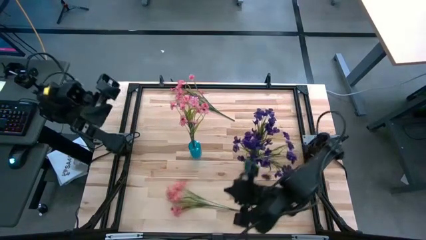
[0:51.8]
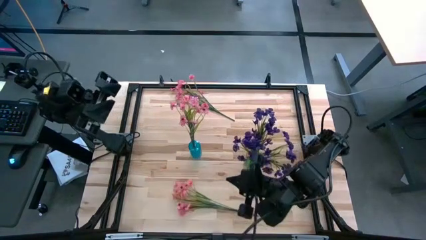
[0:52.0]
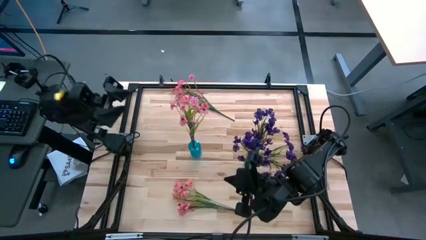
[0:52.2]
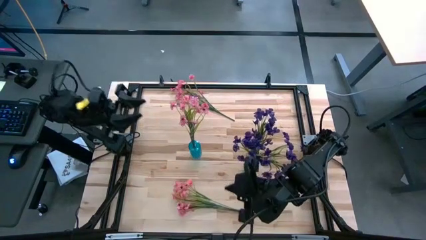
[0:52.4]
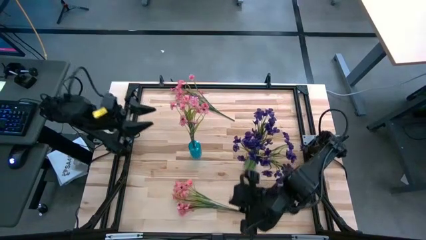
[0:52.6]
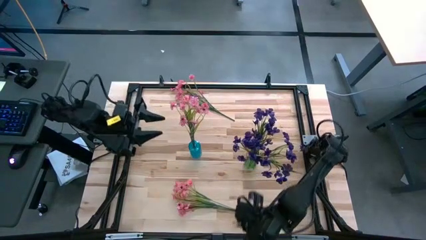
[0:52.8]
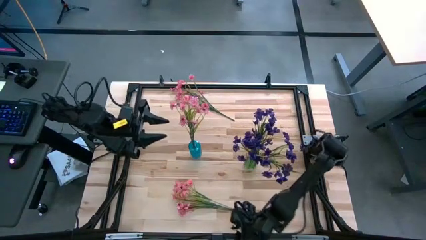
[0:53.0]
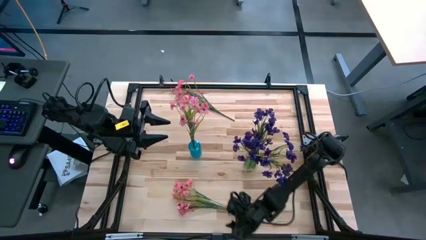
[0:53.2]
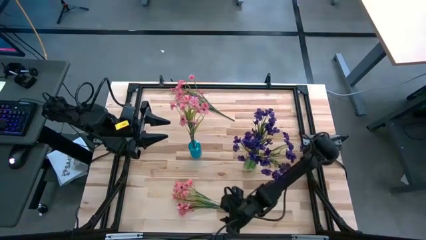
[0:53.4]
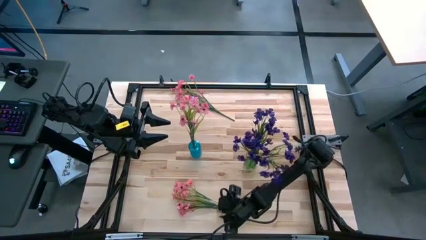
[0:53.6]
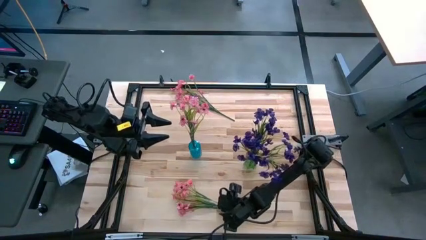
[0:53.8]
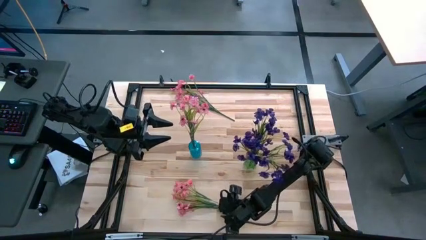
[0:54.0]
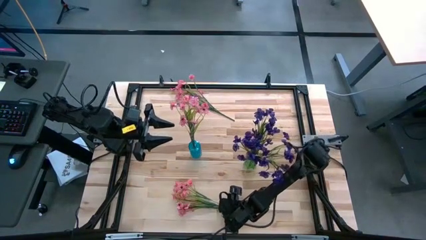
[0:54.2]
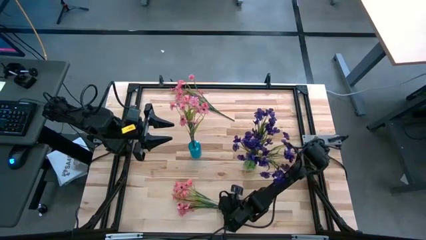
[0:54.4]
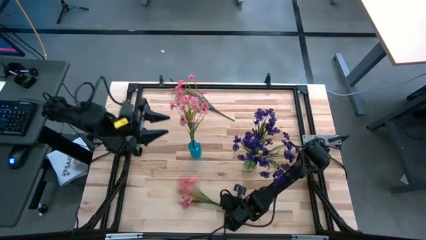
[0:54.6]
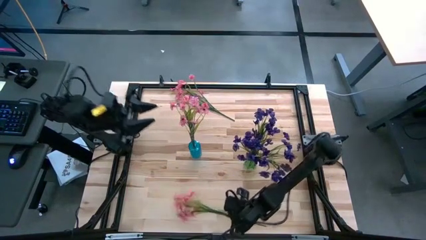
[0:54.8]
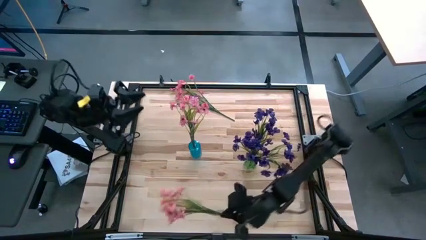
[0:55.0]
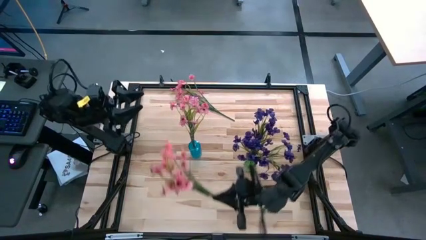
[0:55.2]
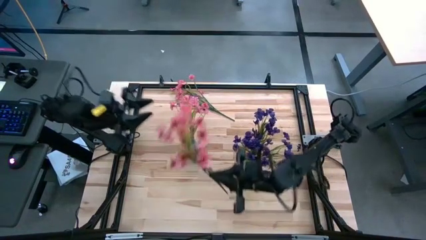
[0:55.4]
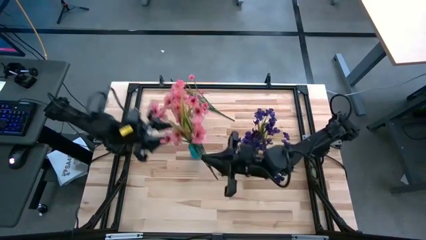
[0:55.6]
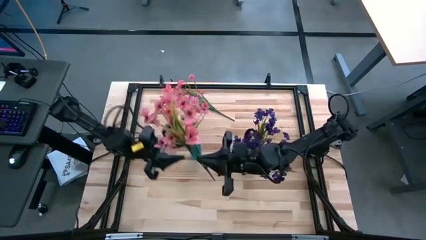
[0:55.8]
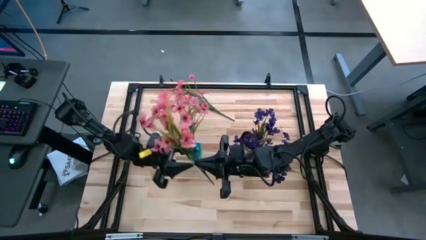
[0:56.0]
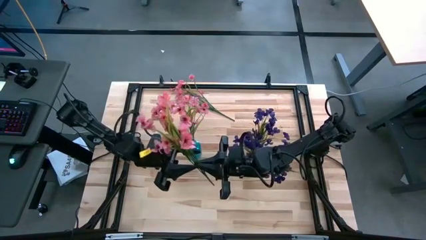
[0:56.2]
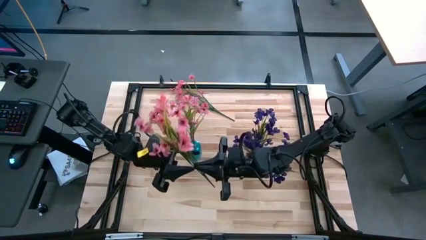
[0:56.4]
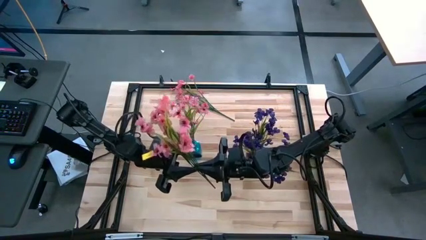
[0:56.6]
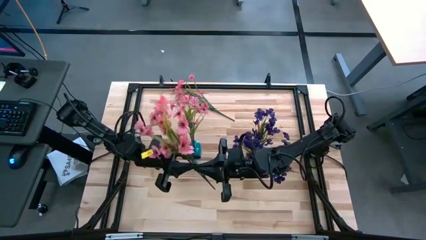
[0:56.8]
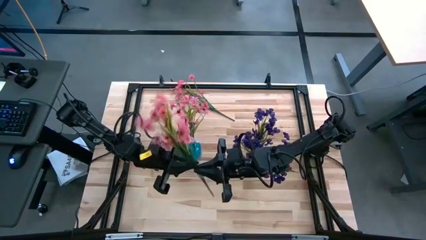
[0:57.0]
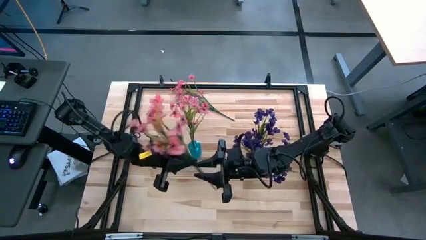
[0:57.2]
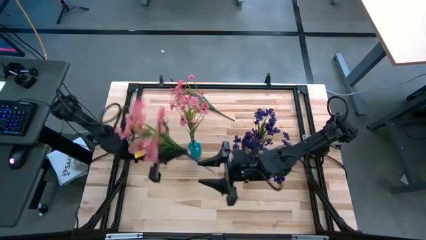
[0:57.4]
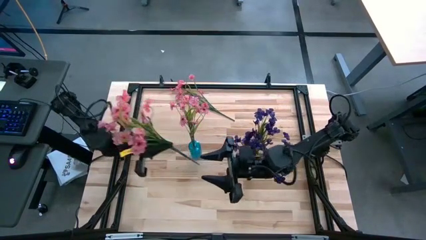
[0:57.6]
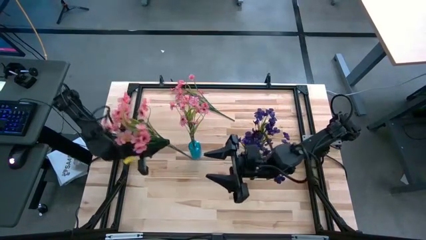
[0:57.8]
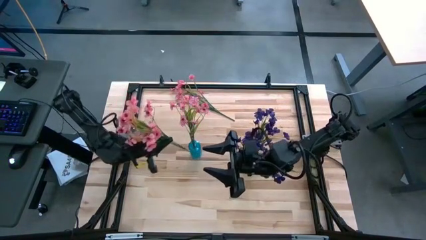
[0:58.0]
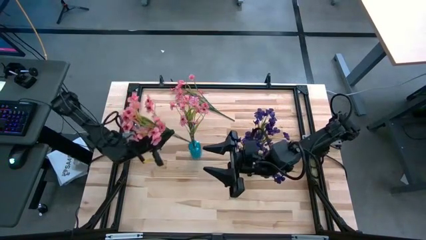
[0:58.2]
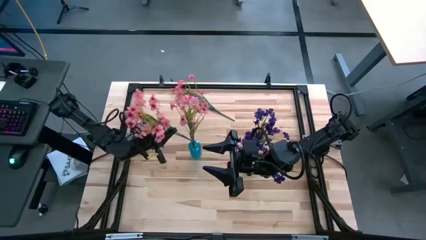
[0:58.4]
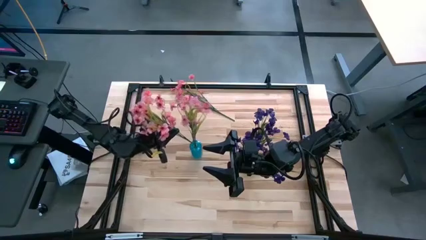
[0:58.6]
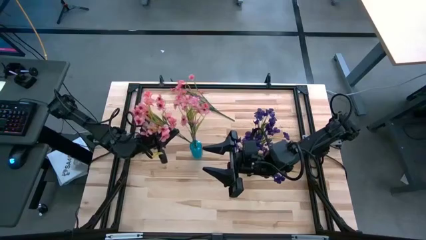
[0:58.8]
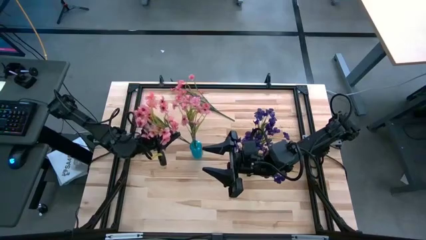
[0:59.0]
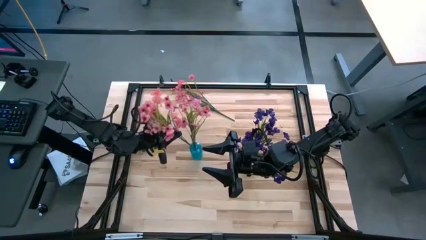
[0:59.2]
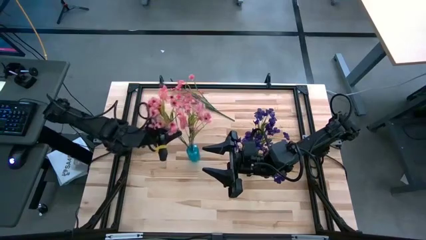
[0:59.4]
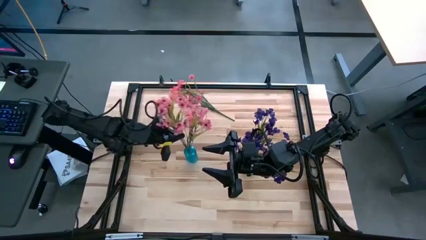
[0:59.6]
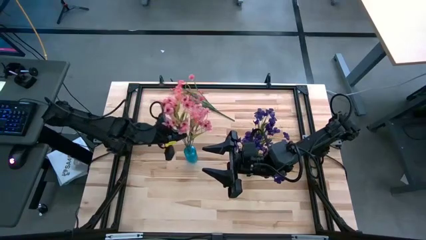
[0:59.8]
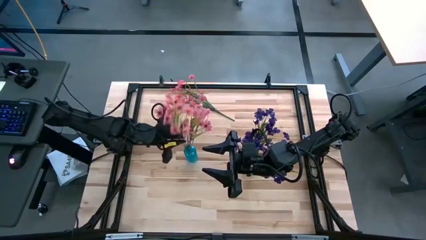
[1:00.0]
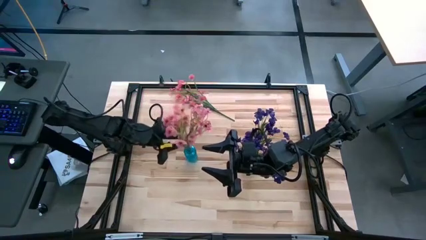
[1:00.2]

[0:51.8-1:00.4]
Task: Sort flowers into vase by color
Put the bottom pink flowers into the blue vase

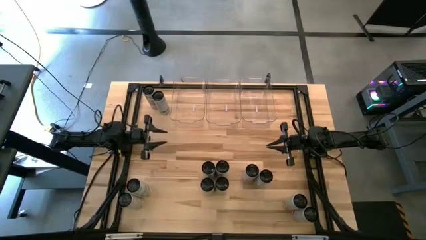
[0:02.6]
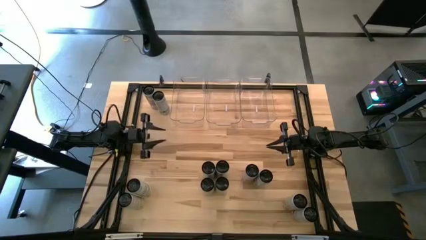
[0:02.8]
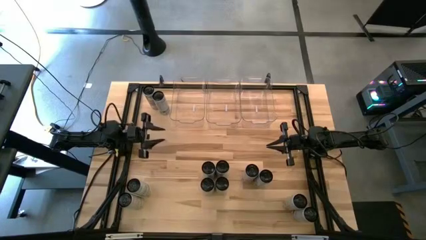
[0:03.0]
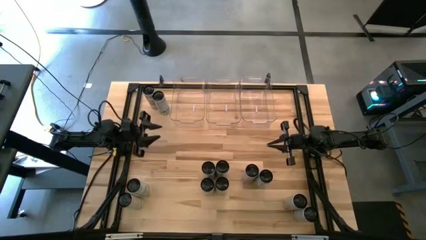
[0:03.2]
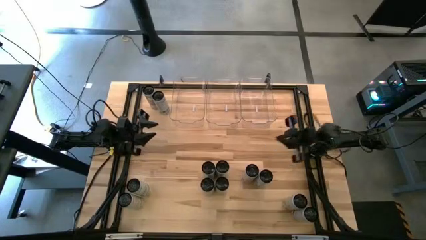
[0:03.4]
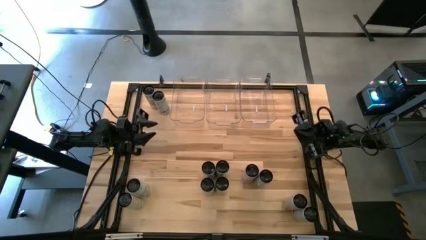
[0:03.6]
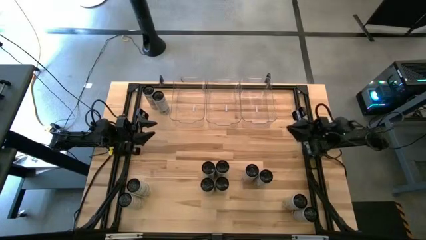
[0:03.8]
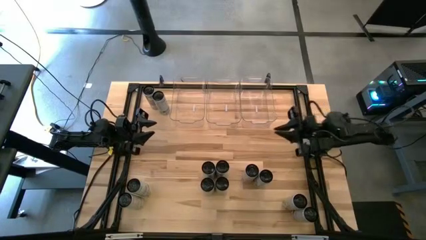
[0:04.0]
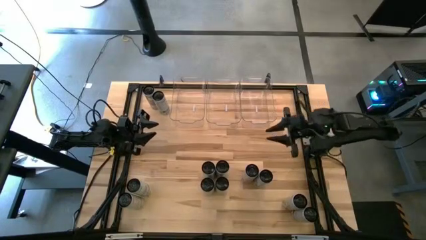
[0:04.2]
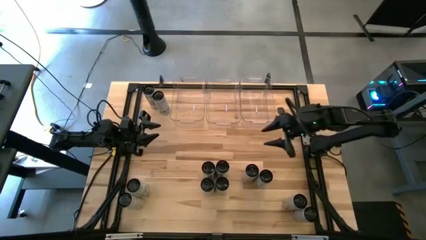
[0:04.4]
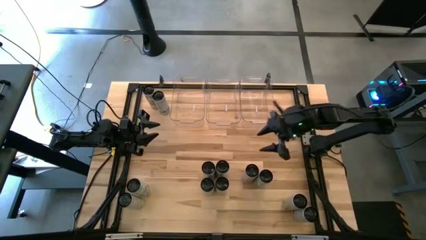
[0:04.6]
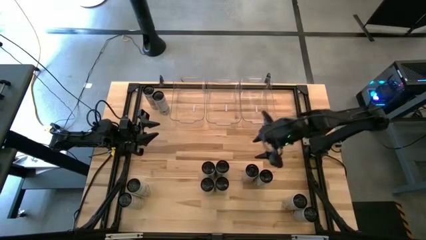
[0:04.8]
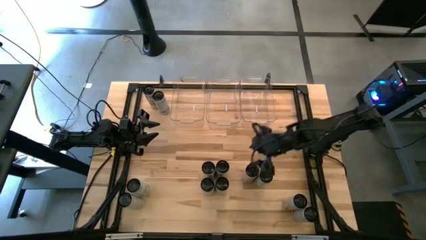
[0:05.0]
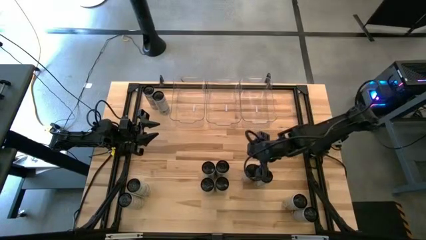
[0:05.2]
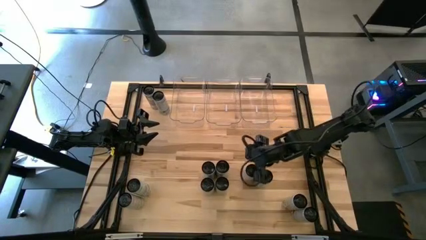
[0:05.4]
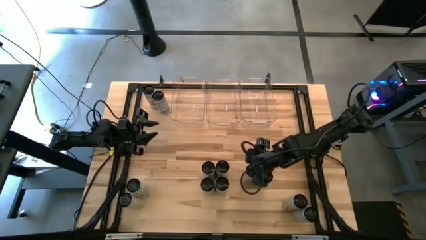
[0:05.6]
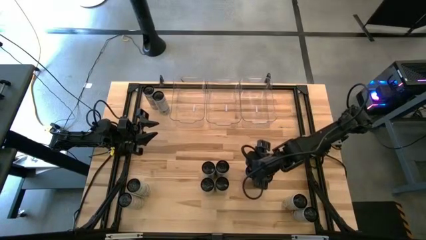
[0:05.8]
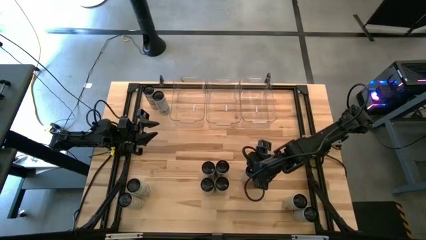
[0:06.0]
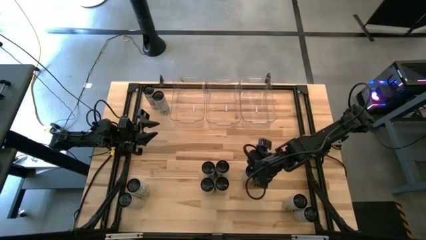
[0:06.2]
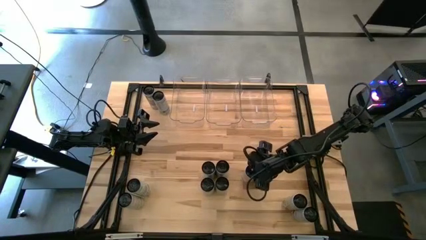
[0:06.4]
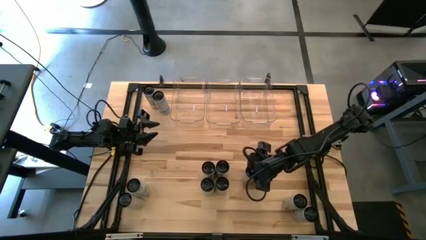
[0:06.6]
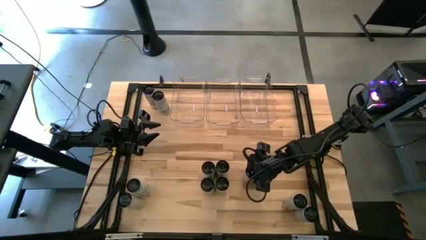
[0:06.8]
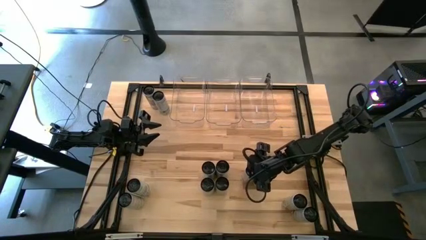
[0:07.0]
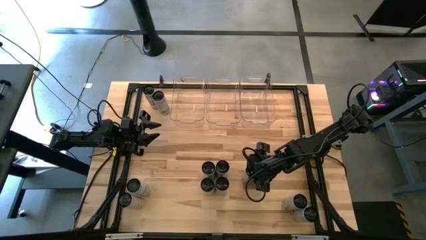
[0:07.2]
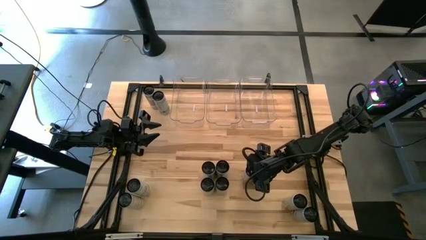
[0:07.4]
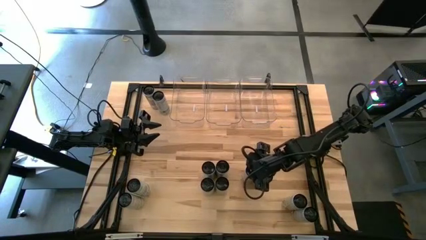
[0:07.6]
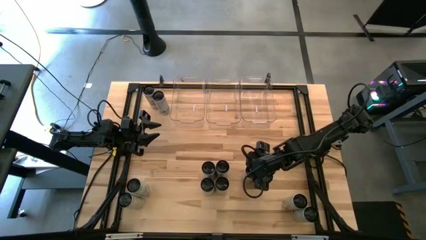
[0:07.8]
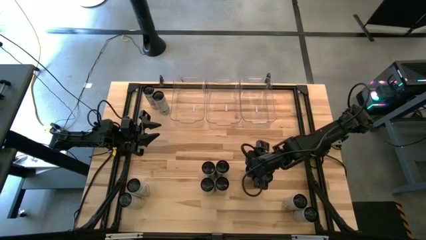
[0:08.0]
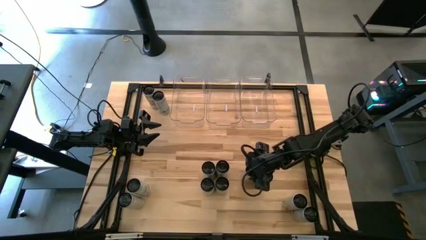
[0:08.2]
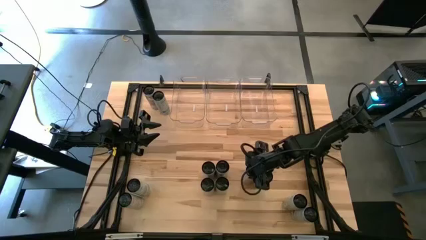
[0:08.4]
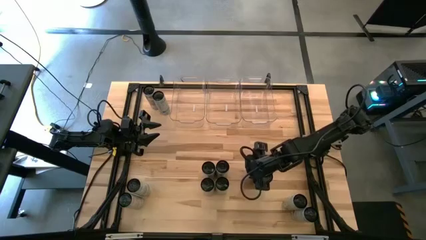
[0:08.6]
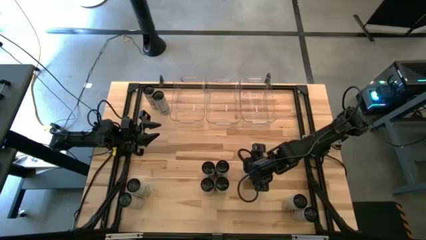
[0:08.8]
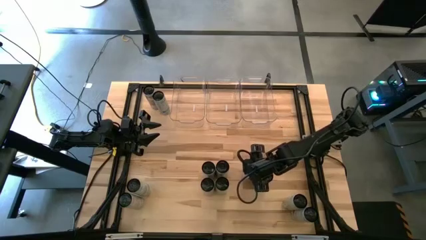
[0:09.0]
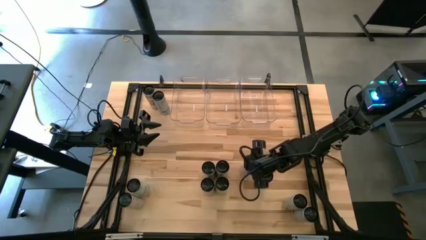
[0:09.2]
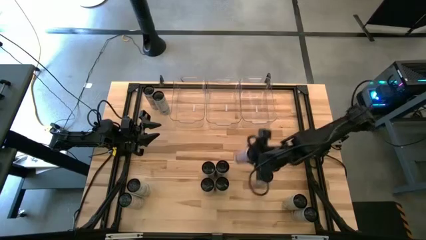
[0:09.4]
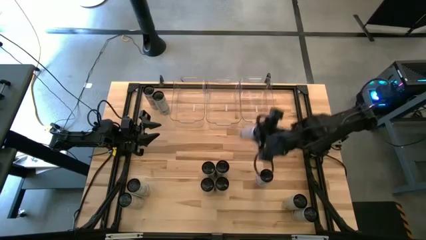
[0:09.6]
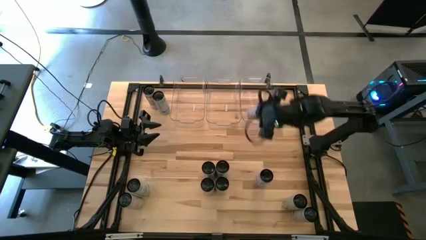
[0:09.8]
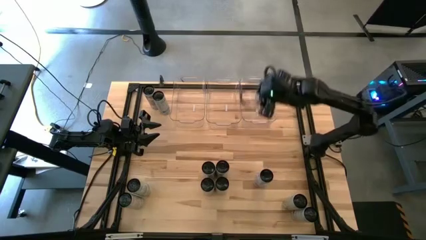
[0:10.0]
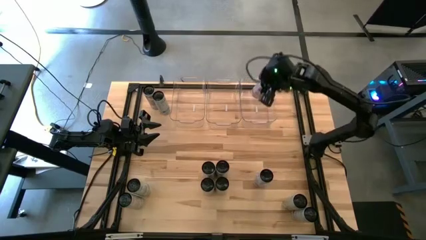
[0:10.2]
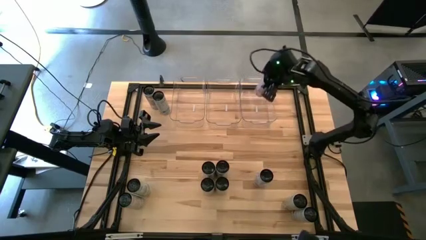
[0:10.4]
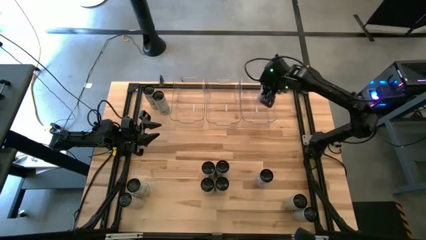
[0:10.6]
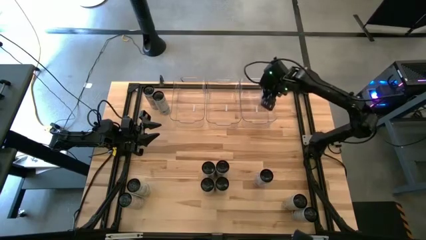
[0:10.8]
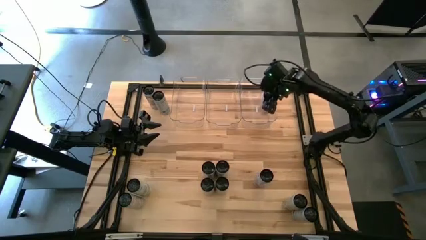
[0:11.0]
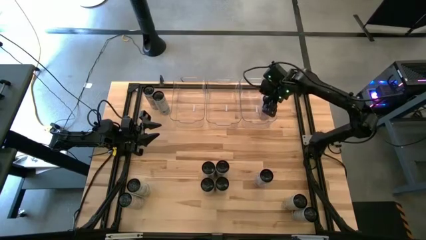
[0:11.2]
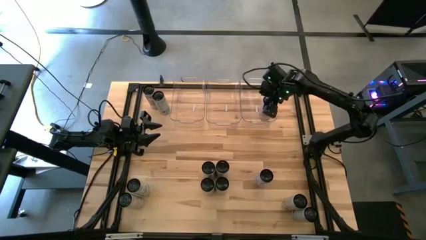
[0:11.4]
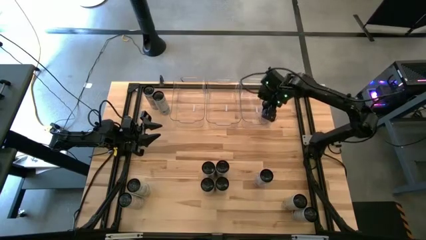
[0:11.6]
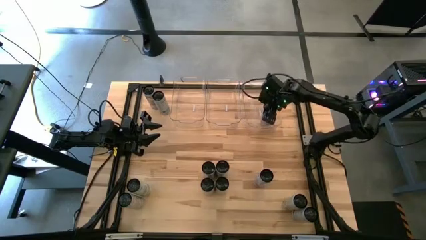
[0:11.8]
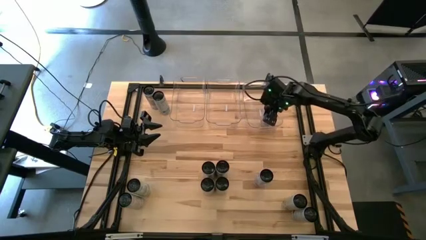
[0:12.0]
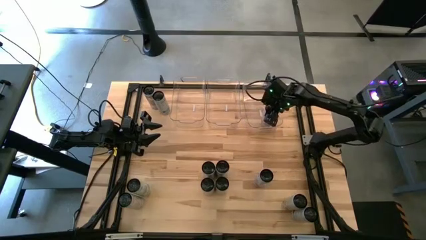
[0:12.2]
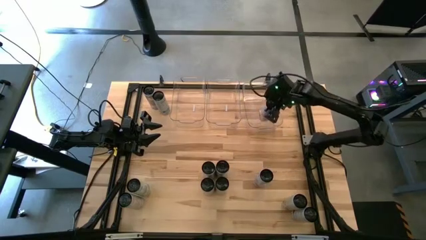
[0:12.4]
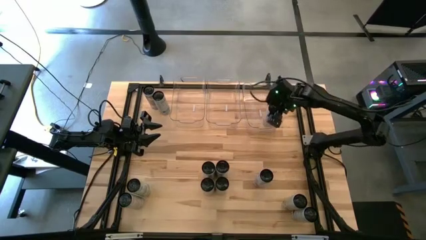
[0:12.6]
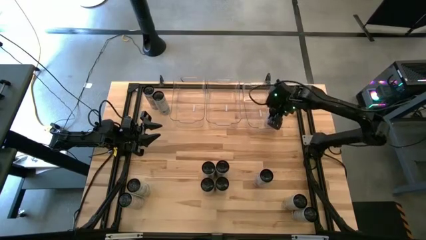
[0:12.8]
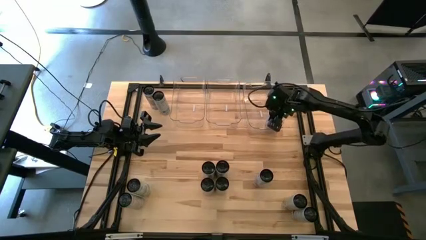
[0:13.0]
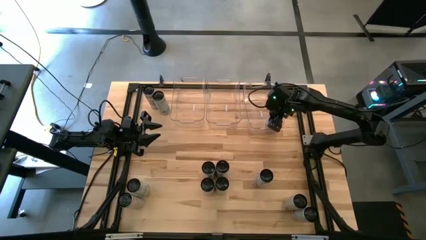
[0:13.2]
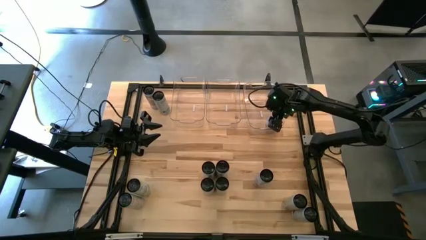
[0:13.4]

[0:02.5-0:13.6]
Task: Sort soda cans
Put the middle right white-pink soda can into the right transparent bin
